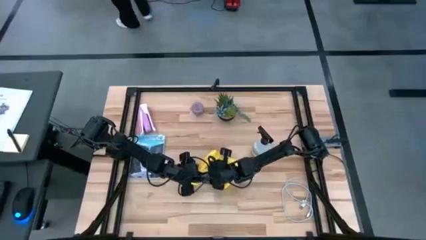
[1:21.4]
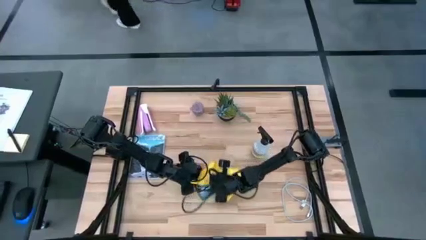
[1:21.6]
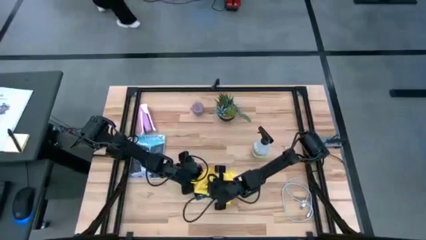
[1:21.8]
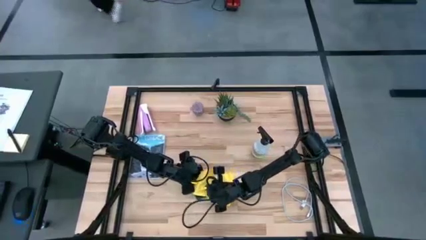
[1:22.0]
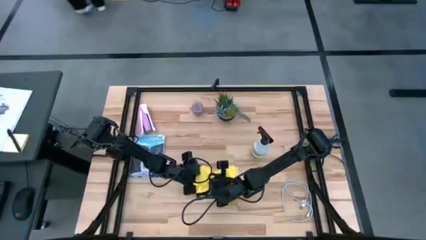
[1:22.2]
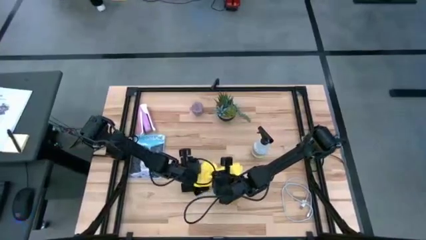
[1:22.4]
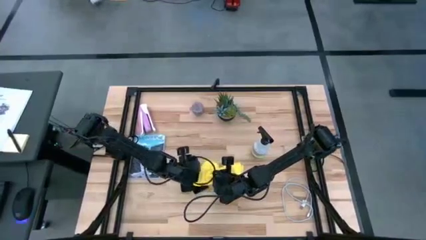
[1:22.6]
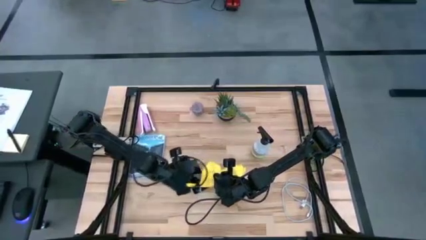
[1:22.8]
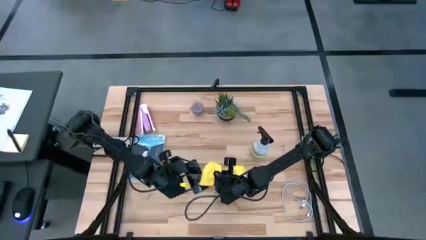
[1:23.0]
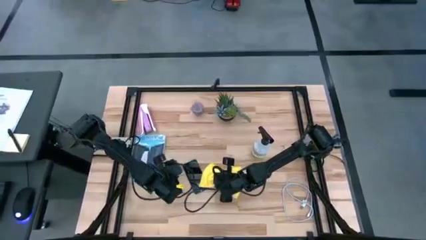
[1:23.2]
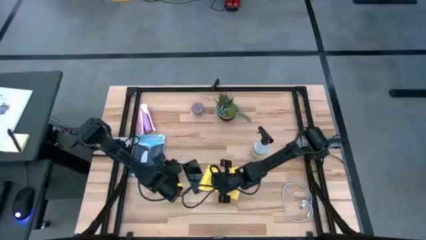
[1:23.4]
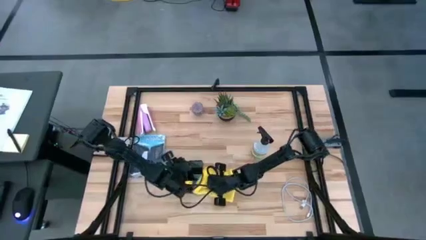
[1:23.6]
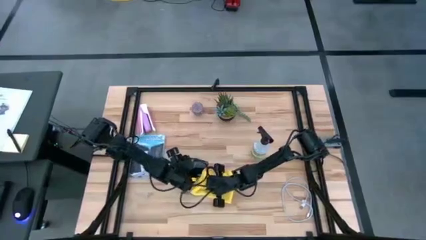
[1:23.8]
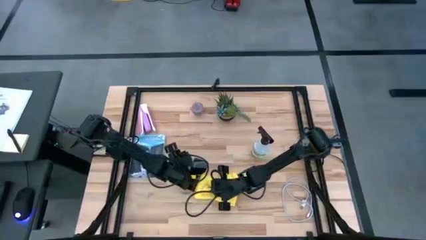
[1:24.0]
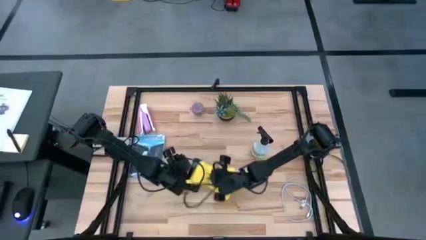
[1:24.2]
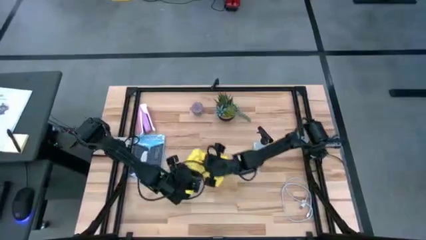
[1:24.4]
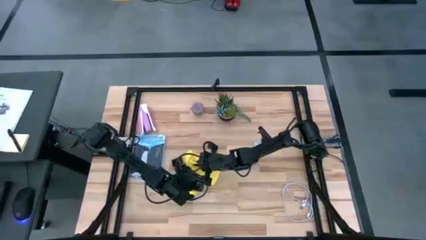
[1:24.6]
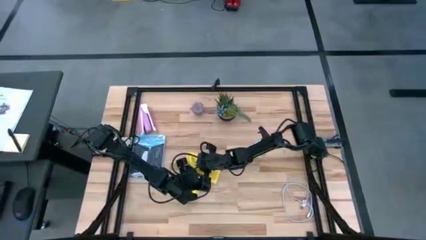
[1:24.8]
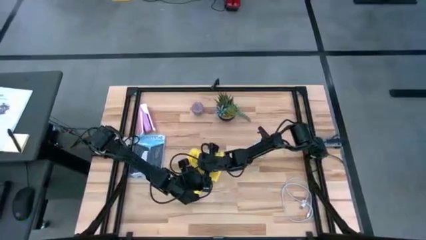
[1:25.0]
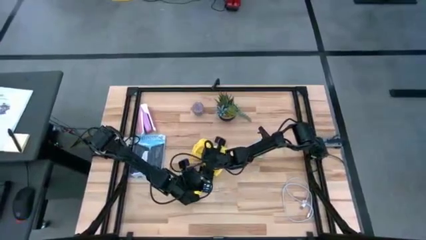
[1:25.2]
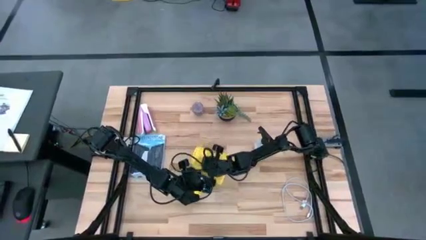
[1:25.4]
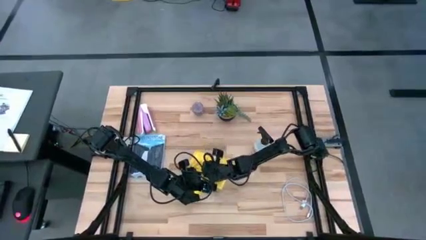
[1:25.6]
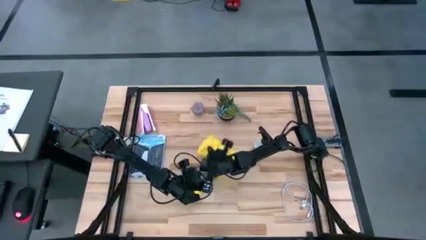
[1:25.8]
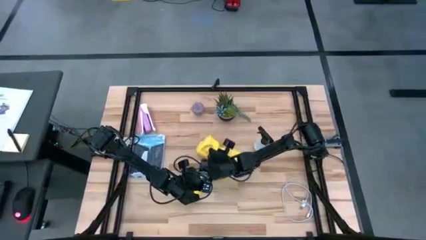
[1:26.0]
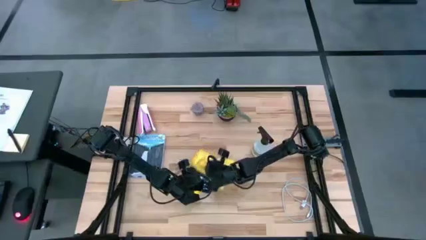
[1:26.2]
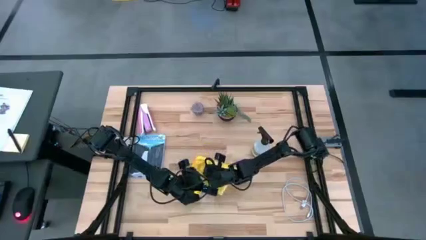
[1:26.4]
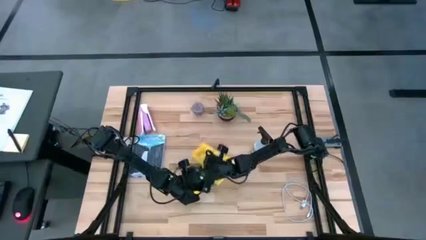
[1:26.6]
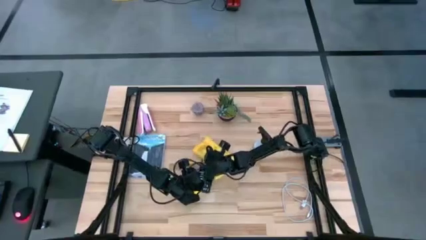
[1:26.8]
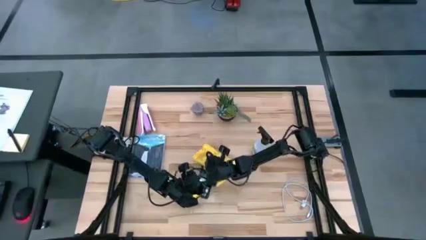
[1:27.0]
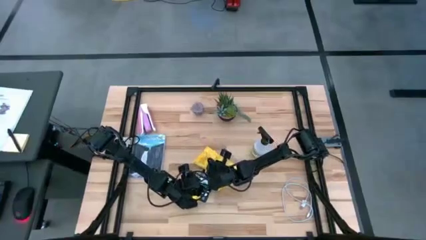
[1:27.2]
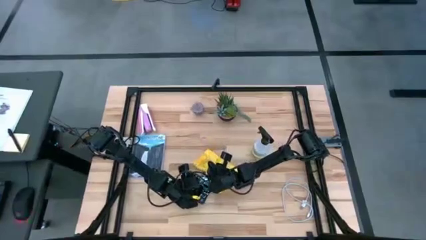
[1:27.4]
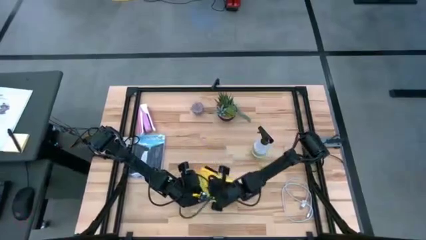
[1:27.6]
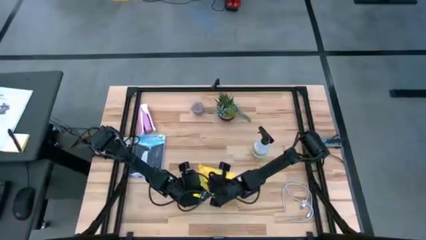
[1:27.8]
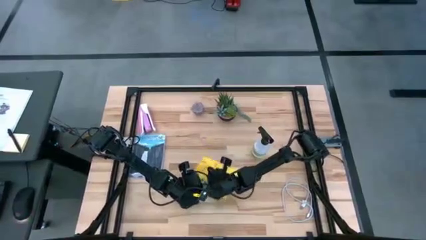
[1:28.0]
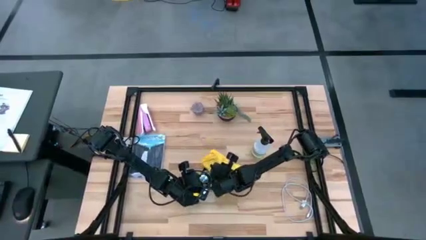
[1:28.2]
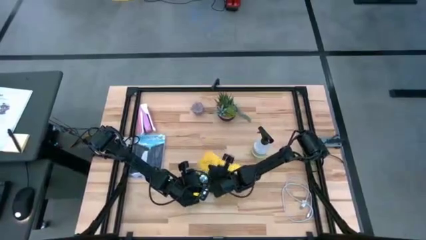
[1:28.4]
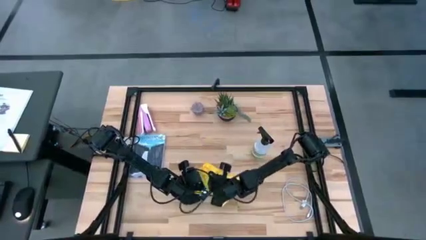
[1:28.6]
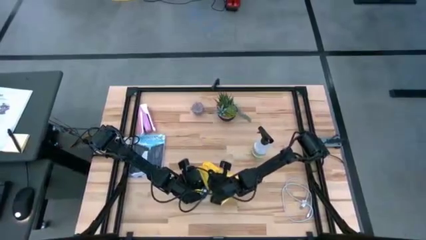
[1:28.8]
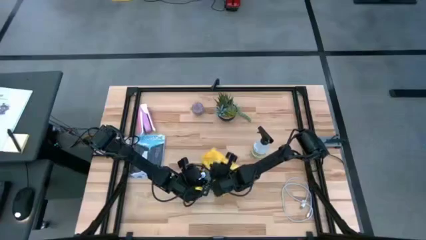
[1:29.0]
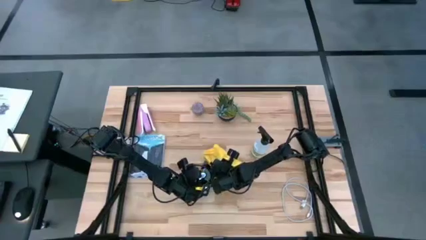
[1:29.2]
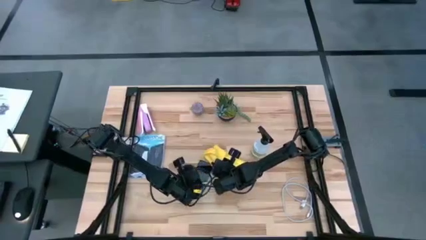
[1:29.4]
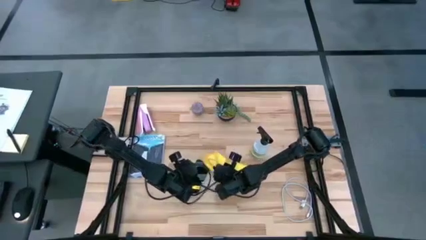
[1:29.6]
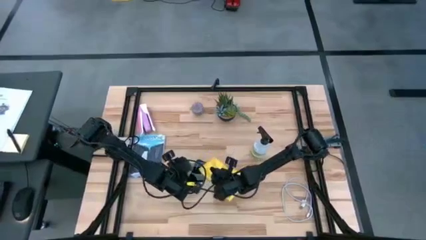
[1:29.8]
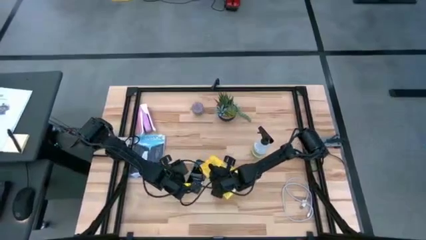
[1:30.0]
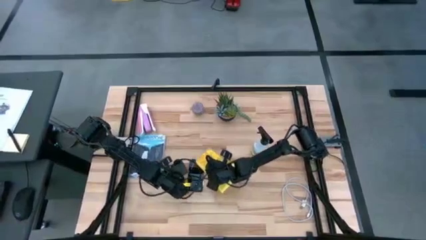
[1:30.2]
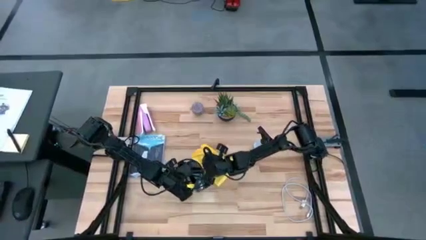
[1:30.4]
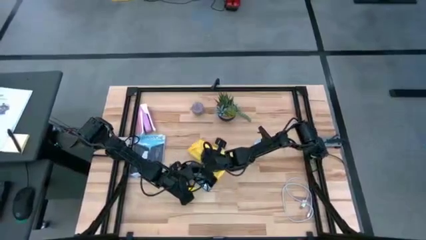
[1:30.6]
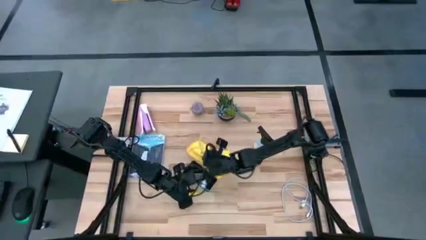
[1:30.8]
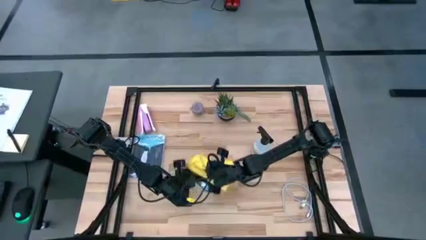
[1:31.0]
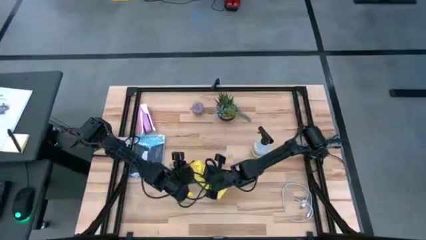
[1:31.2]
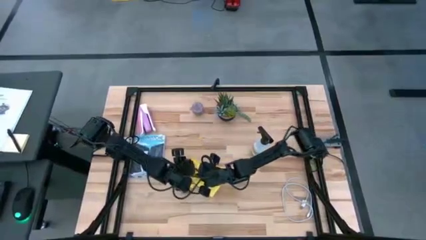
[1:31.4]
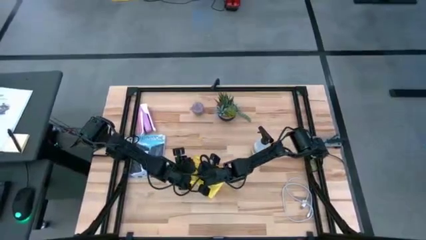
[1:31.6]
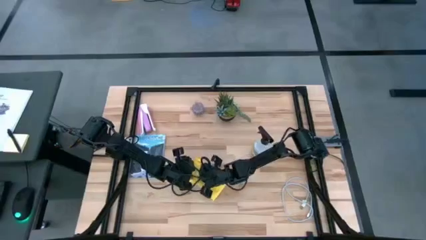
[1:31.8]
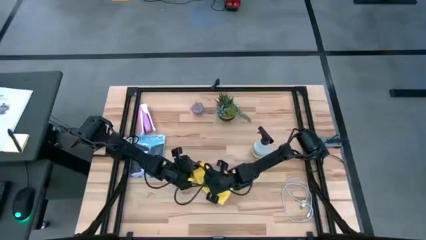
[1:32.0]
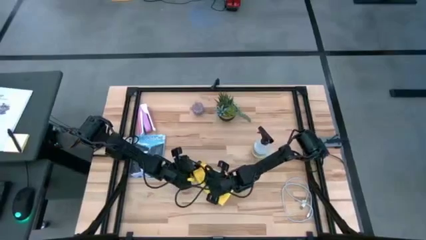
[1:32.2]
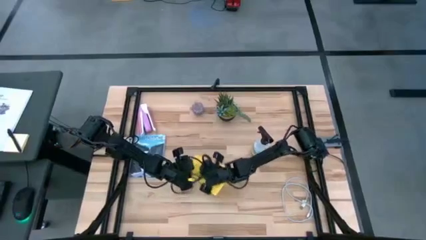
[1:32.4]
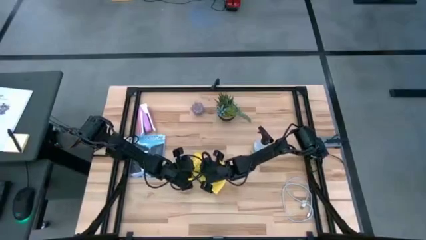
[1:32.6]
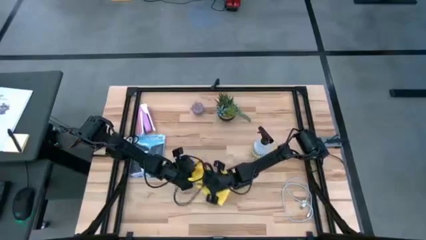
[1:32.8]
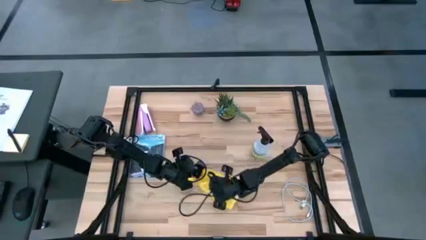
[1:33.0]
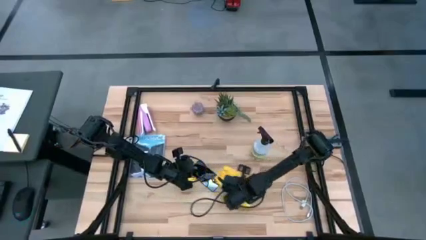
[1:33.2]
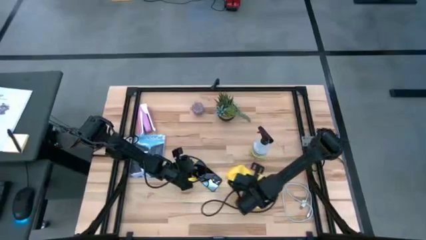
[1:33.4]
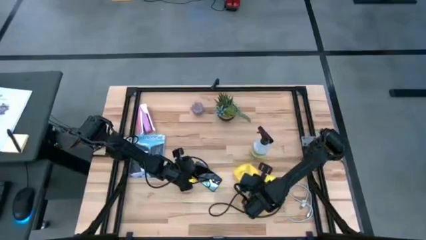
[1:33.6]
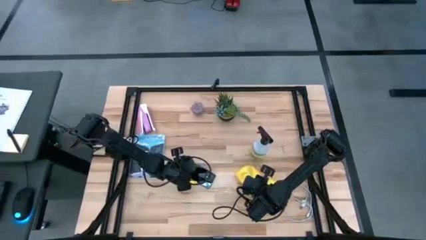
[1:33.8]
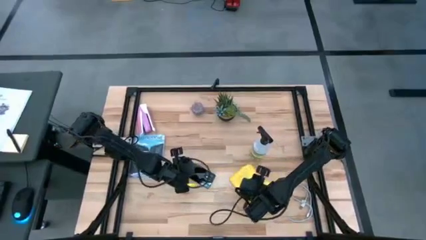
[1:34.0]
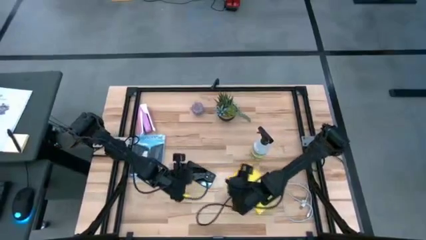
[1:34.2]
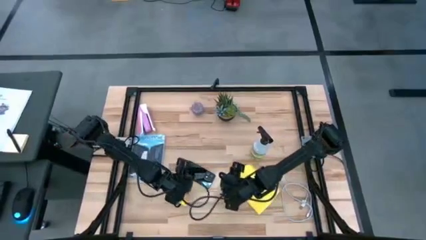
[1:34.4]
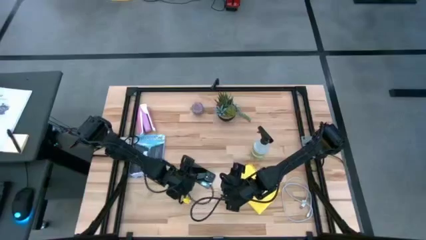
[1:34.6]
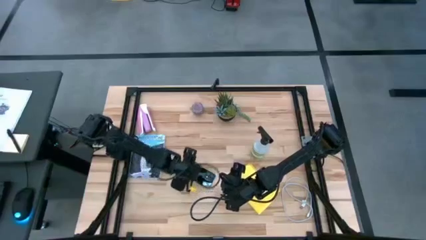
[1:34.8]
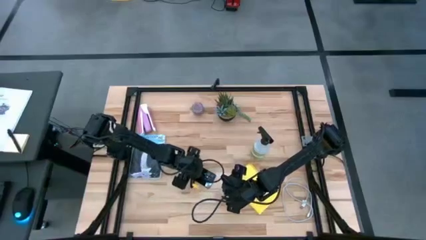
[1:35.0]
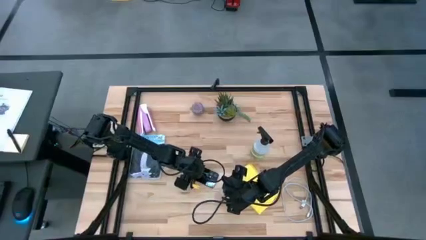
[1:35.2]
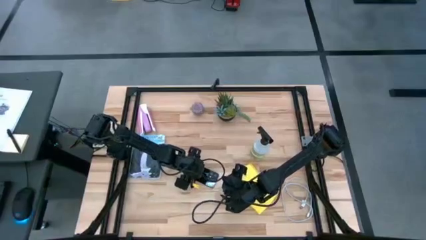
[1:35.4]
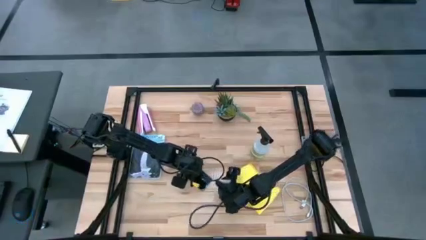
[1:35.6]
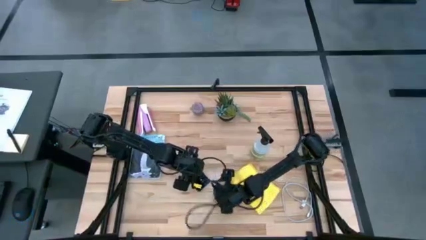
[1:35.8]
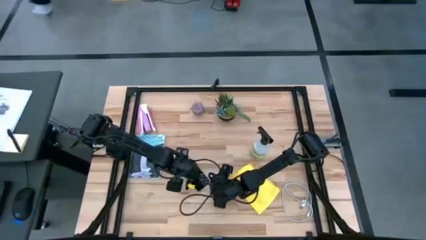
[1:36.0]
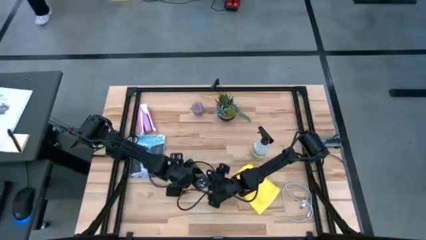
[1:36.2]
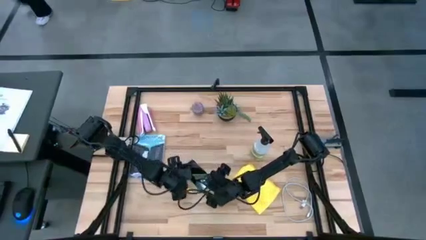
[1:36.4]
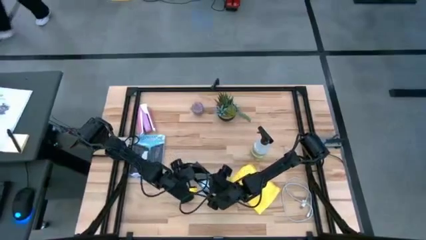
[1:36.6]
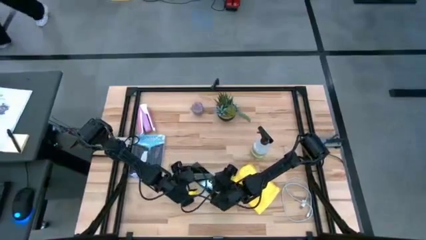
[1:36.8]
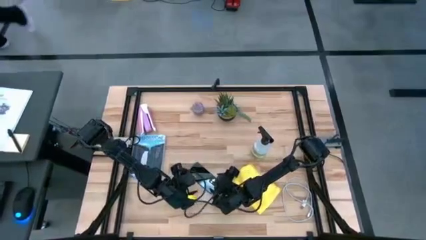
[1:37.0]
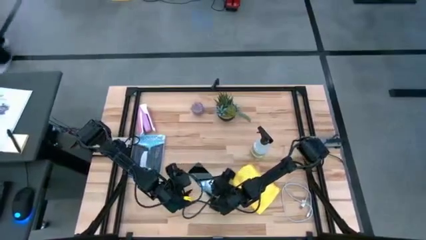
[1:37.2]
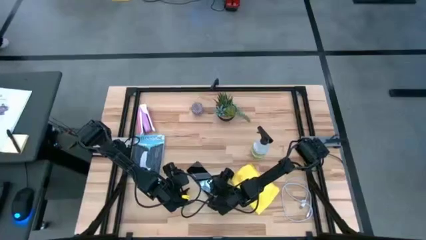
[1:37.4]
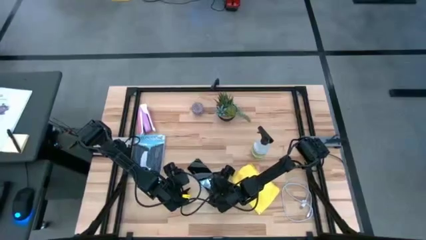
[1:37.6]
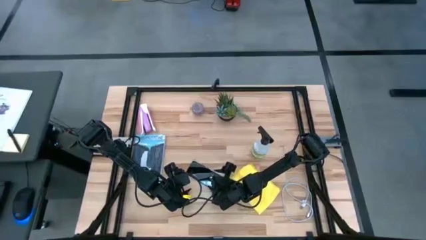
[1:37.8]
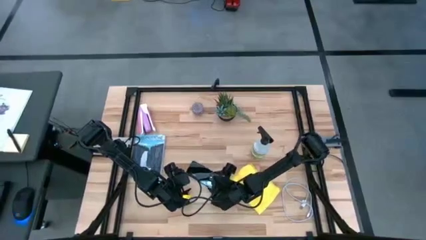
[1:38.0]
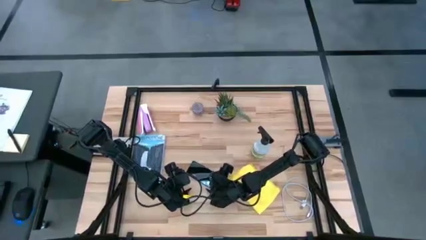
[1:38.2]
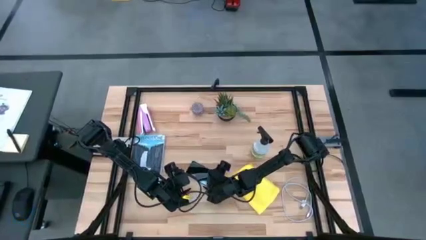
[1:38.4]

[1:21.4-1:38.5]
Task: Apply microfiber cloth
Wipe the cellphone with the microfiber cloth
